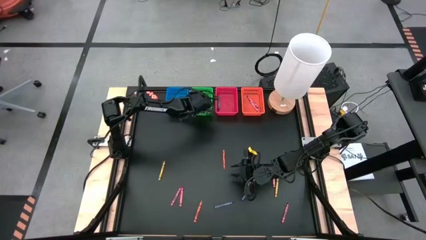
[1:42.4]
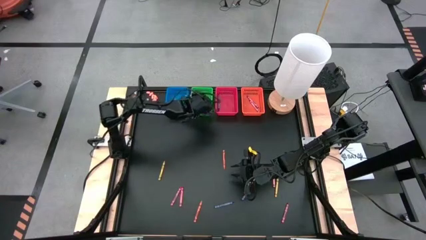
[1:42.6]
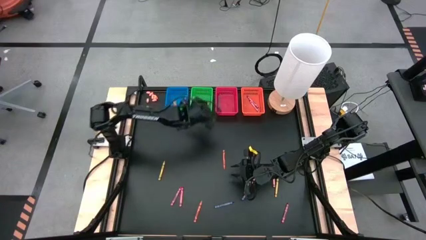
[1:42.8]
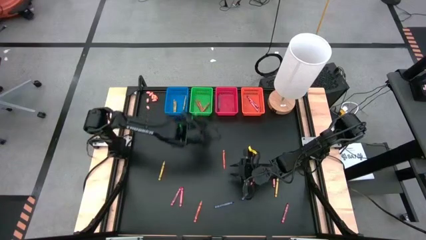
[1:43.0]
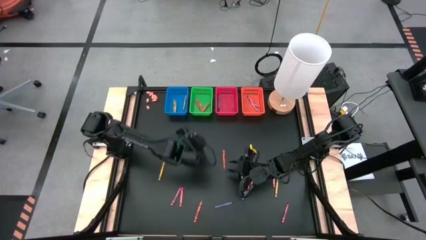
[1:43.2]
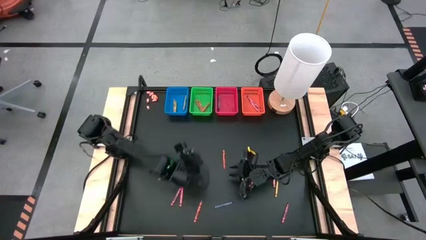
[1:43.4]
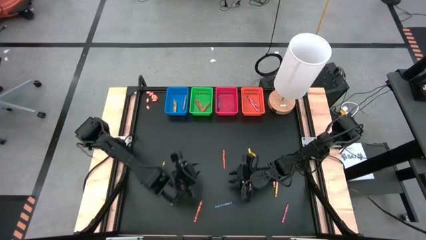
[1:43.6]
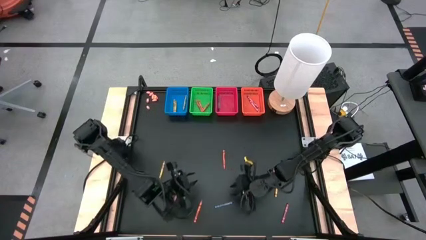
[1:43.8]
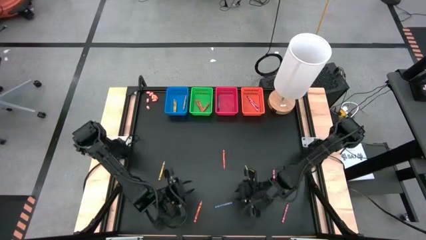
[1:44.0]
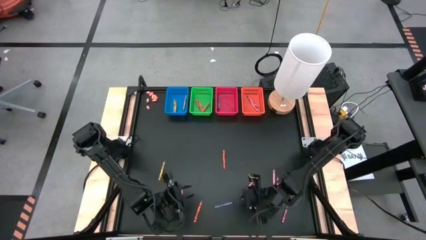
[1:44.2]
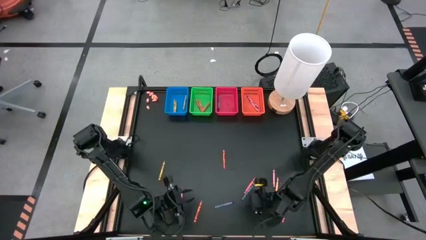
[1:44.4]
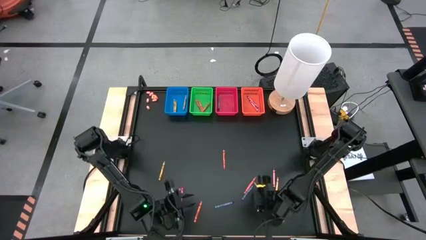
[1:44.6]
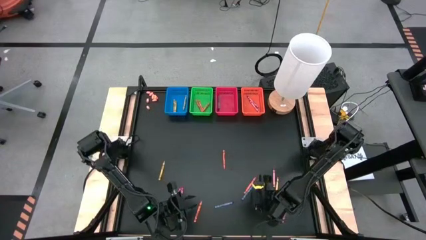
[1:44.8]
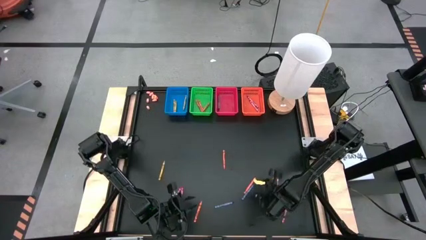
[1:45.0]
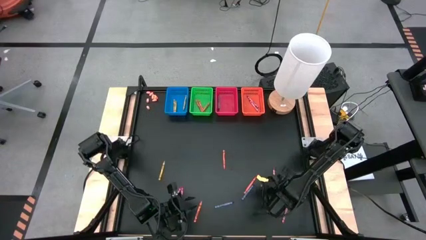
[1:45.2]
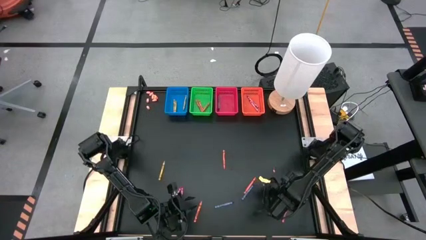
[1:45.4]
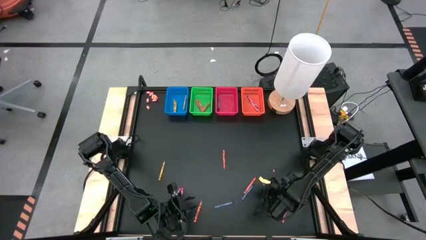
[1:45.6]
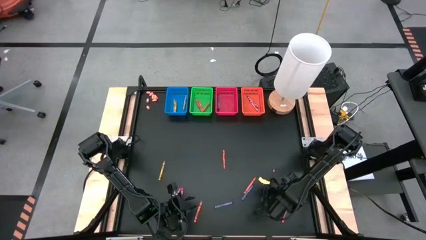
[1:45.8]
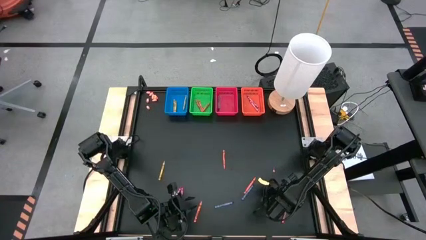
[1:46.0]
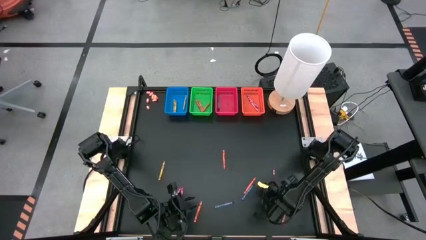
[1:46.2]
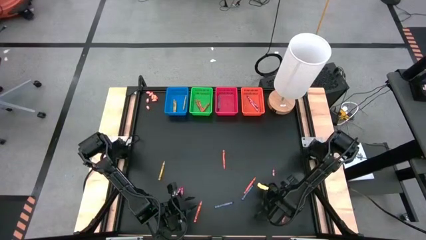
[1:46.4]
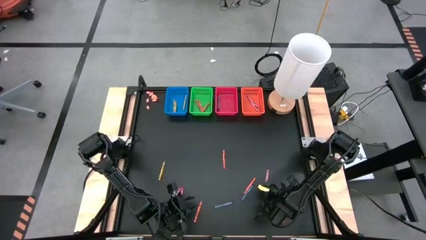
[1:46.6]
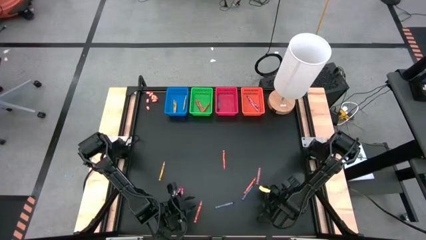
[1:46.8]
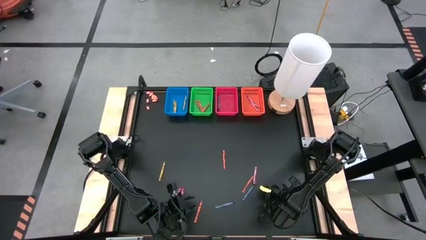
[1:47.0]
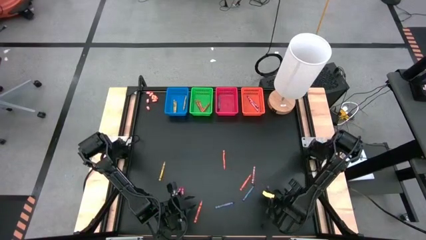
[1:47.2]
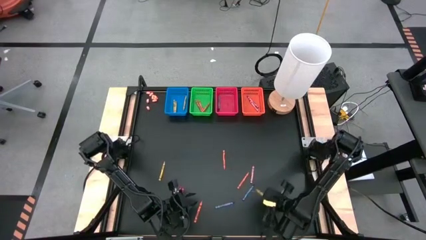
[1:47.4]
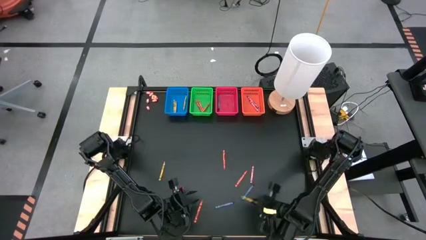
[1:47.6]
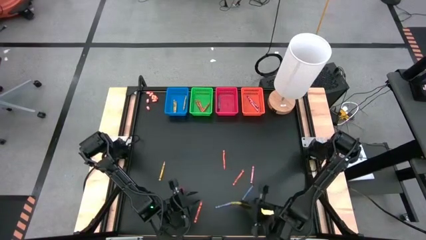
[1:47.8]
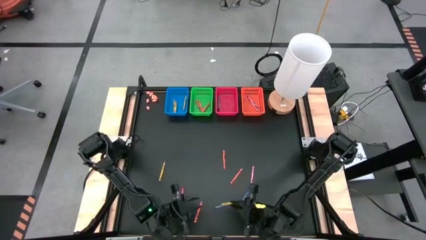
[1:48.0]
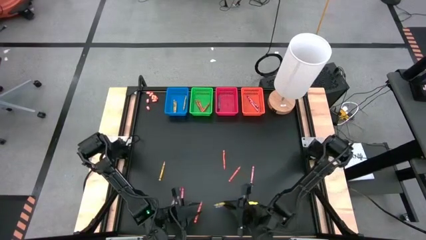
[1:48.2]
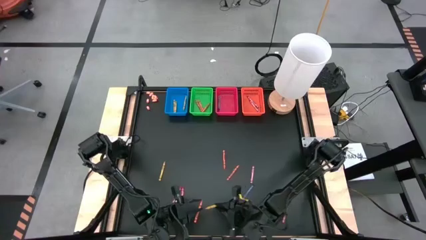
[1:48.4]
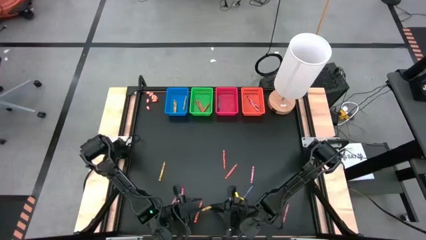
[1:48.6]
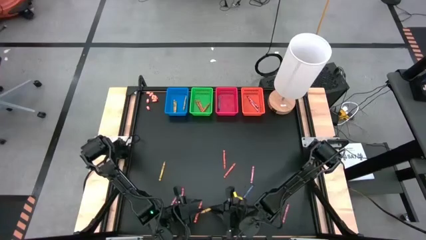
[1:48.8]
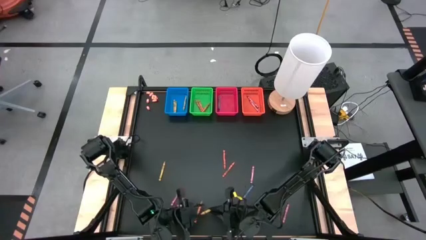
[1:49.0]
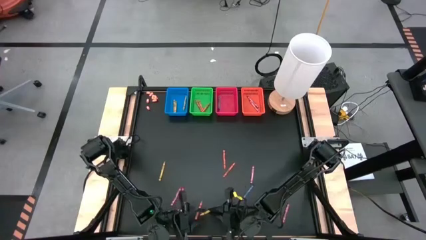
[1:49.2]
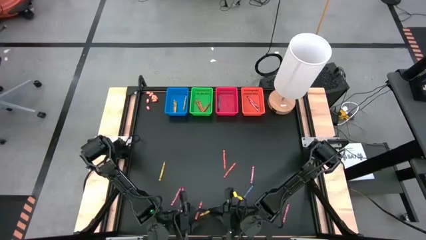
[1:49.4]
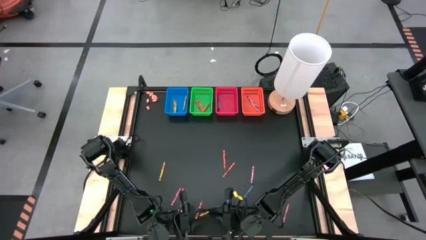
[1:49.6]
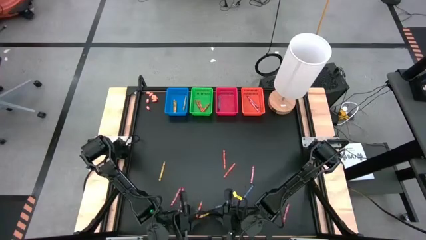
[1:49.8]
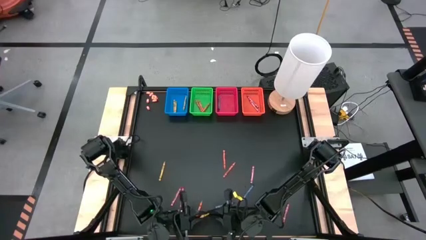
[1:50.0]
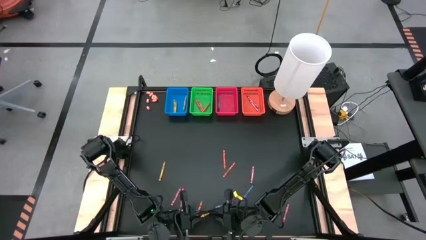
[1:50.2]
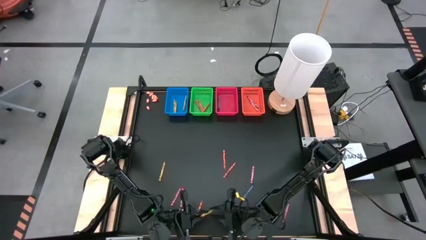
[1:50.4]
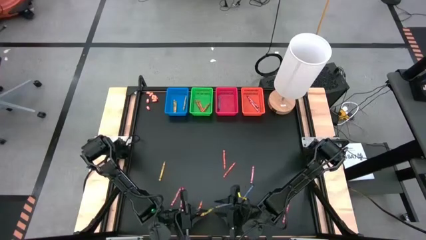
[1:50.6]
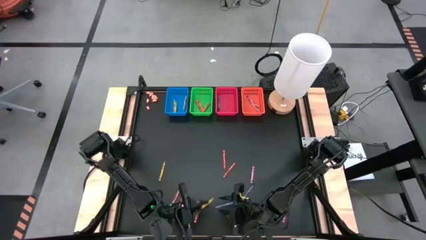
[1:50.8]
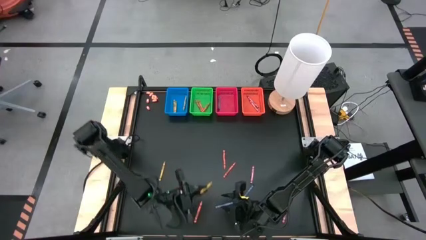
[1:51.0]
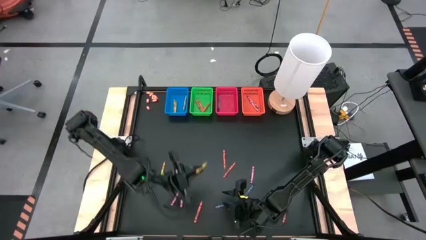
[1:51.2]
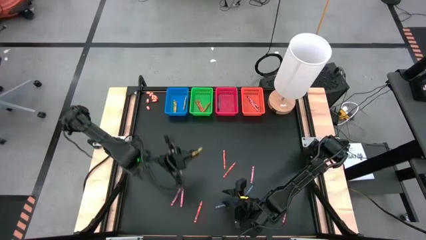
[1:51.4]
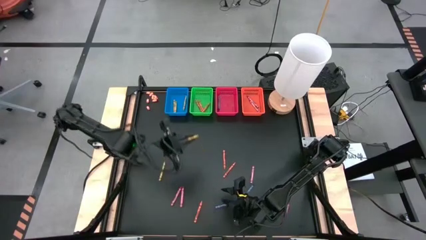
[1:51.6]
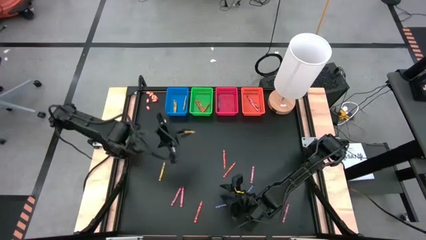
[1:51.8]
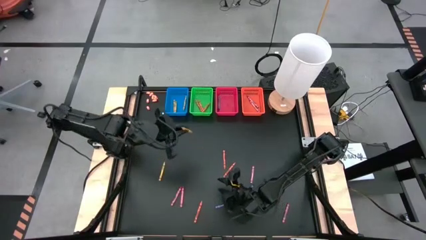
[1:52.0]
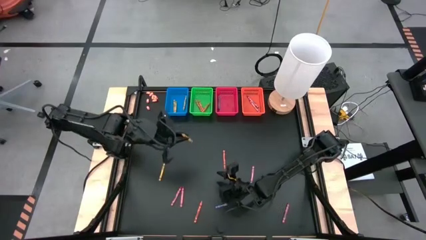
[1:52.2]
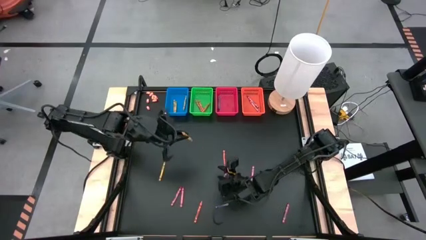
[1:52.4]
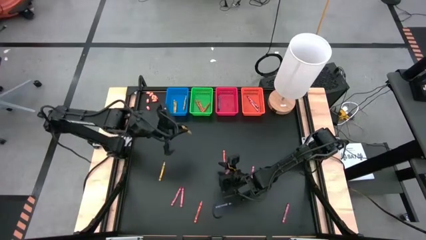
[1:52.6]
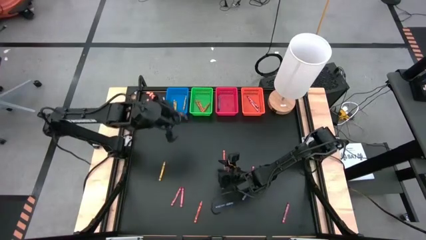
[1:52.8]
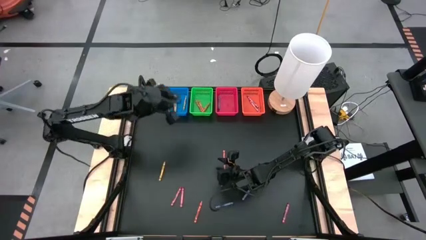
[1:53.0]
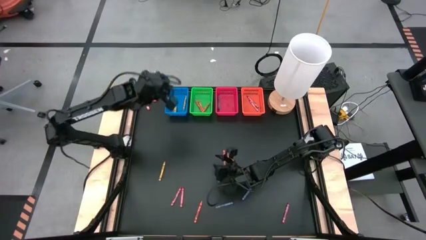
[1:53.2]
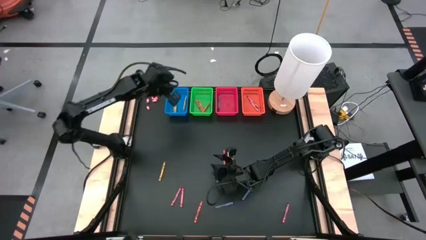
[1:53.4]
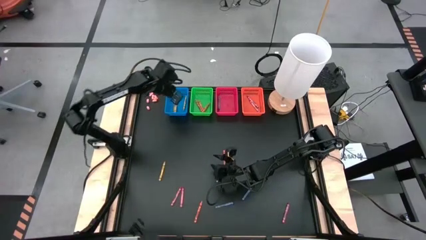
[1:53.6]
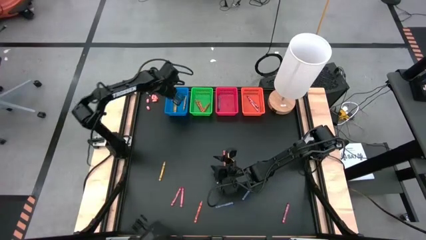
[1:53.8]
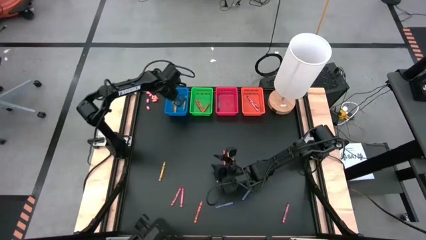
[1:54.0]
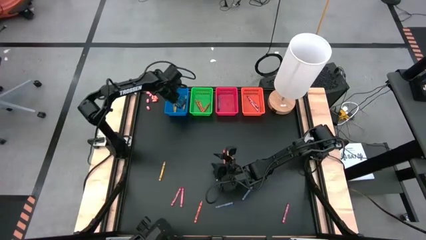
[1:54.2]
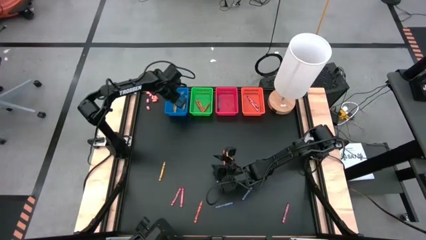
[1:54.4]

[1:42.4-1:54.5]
Task: Sort crayons
Put the yellow crayon into the blue bin

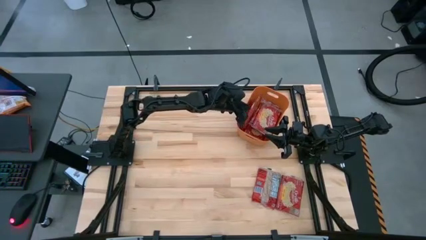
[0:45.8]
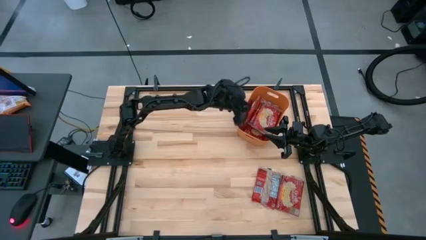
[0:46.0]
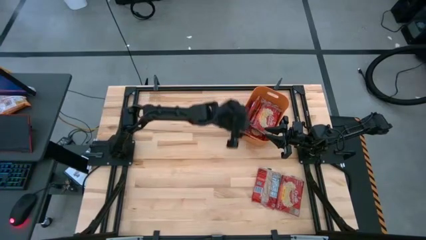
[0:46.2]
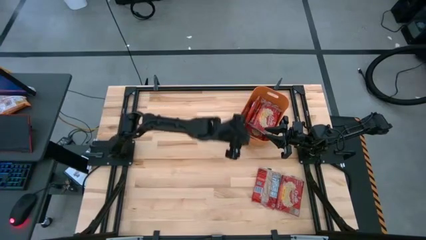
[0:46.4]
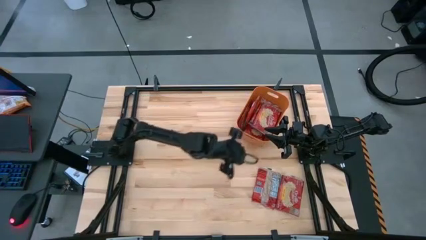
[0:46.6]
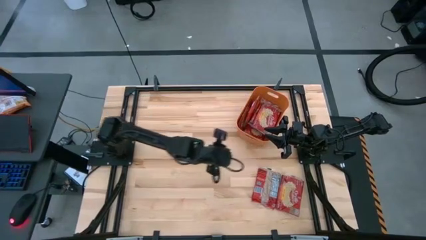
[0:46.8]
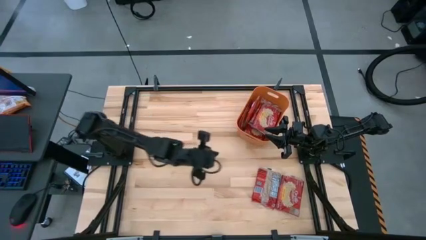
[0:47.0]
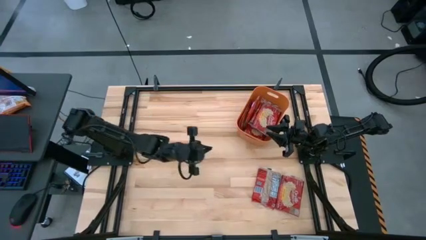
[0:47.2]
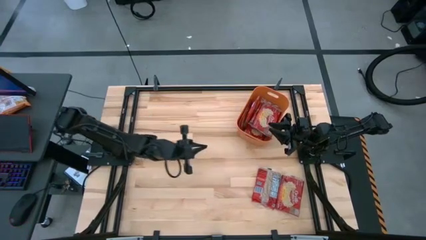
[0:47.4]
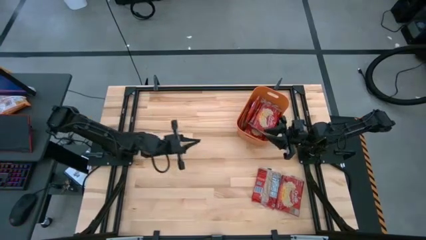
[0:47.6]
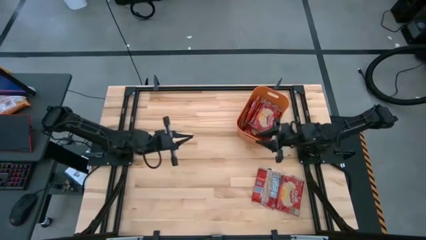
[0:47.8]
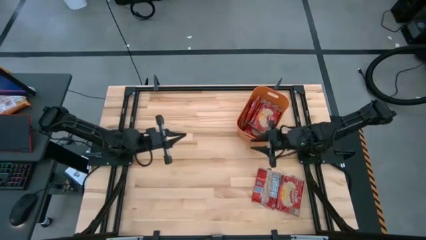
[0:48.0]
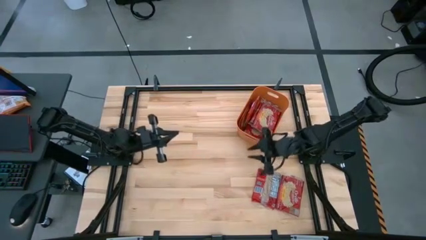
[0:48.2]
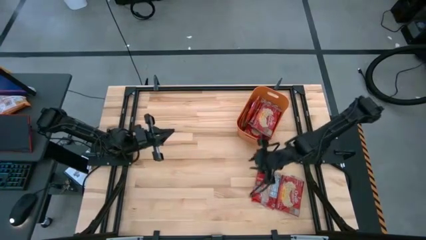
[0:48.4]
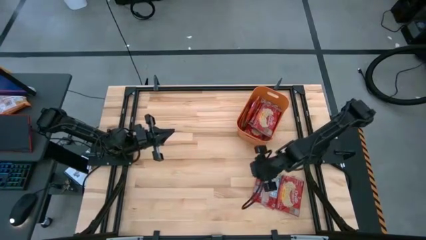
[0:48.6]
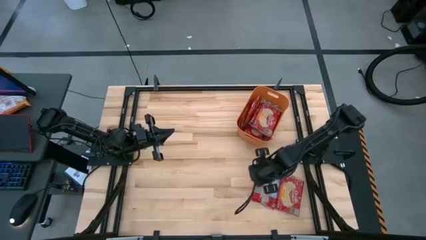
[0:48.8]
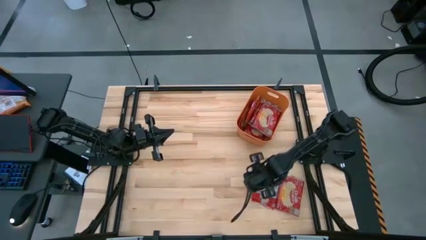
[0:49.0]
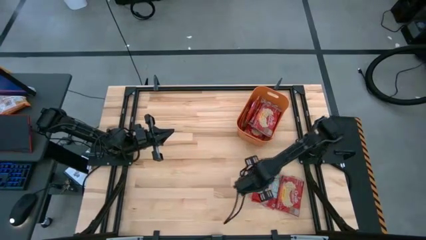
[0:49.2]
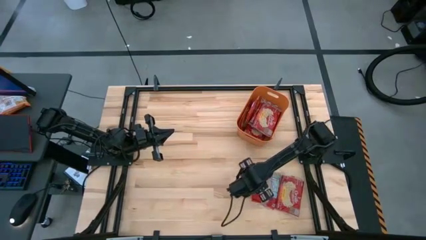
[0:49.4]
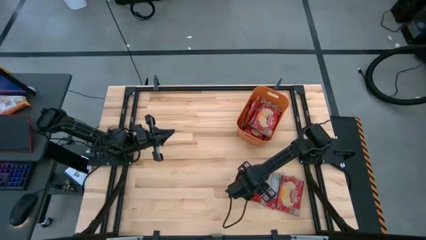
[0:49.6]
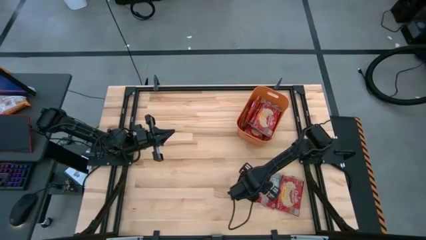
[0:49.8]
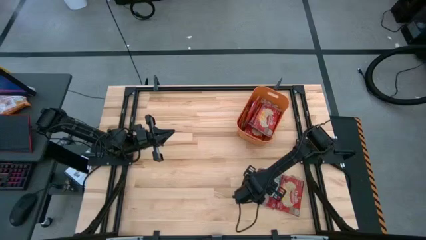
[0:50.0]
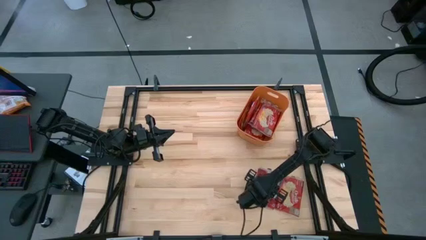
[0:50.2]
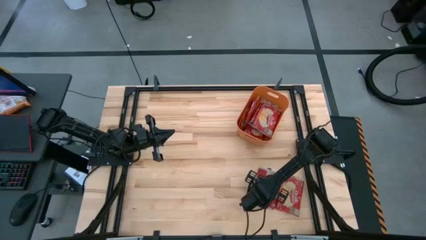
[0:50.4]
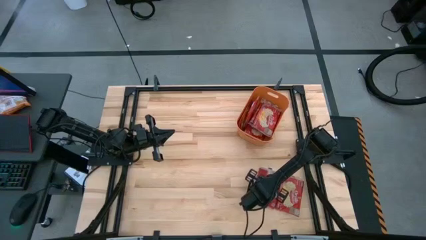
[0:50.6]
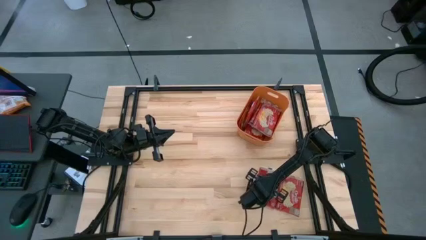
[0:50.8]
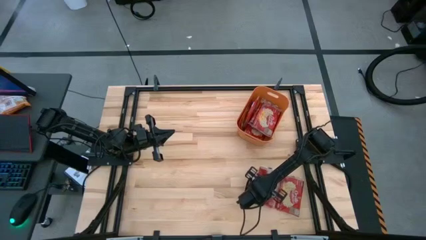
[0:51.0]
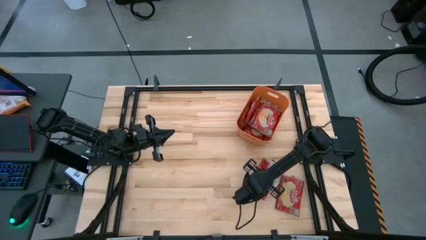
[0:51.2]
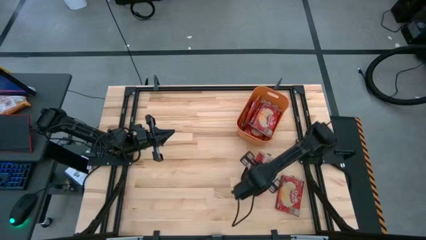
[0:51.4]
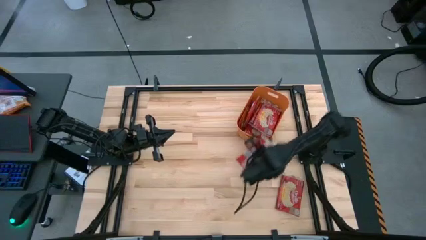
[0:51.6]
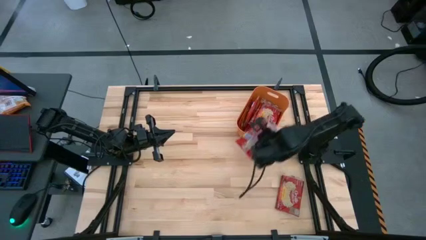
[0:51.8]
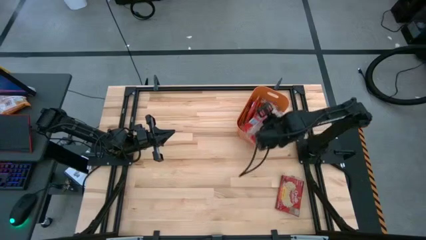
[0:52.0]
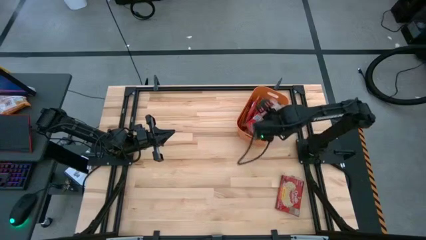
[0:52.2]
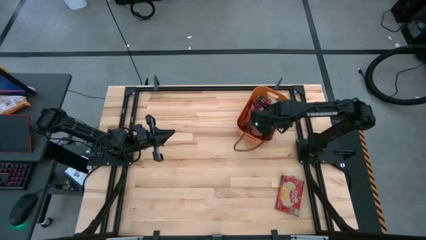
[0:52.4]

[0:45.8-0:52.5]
Task: Sort popcorn bags into baskets
Put the red popcorn bag into the orange bin
